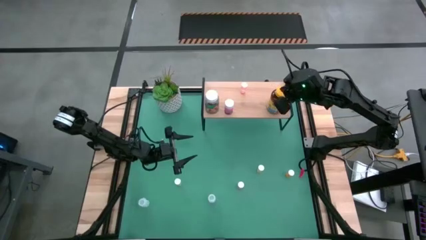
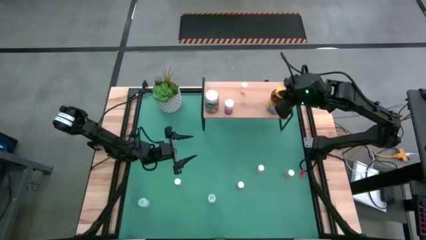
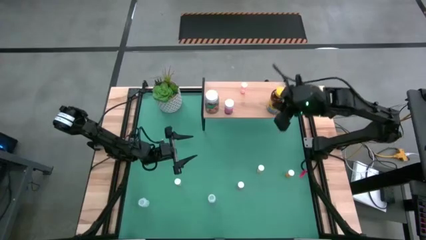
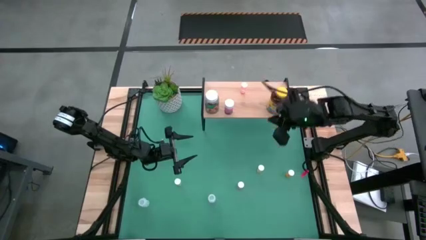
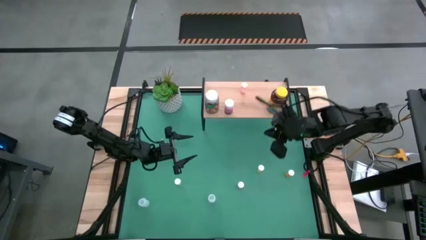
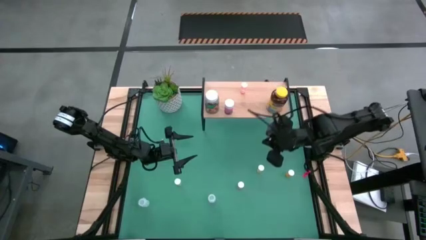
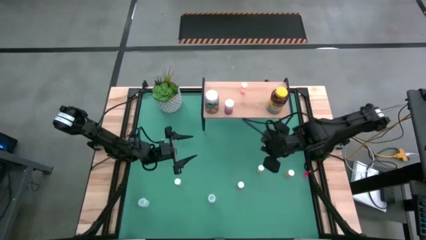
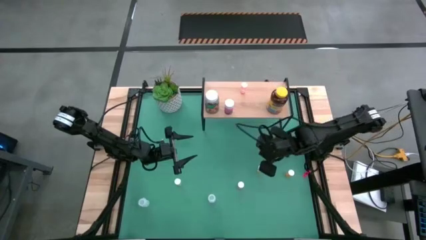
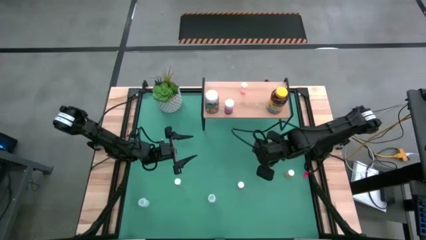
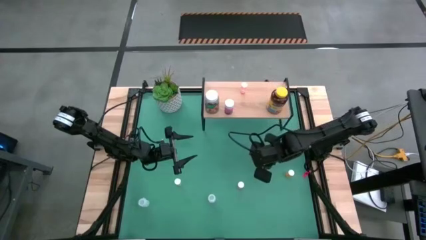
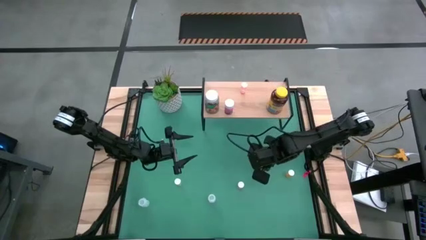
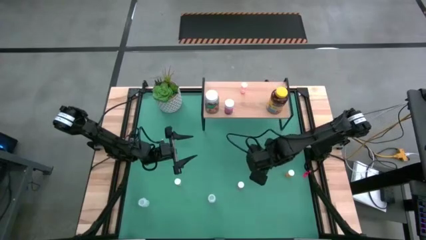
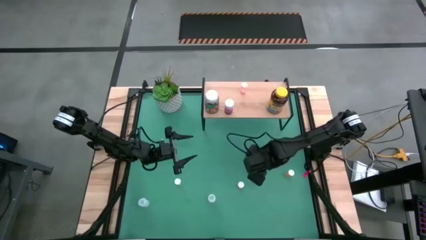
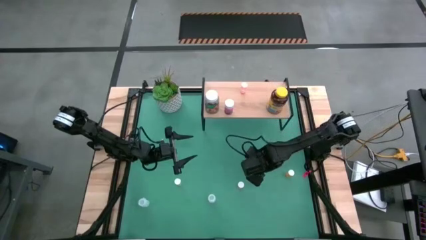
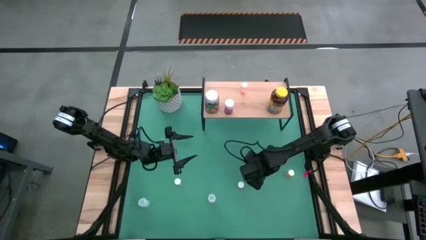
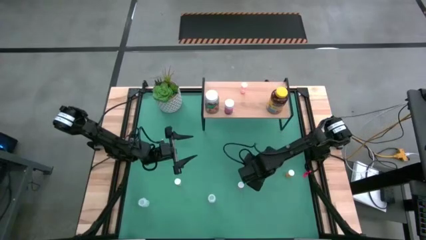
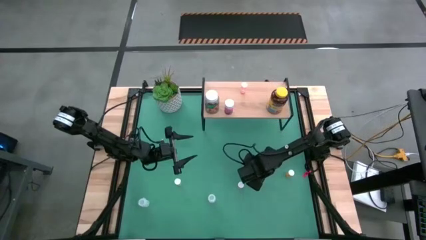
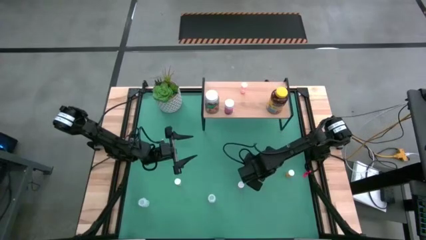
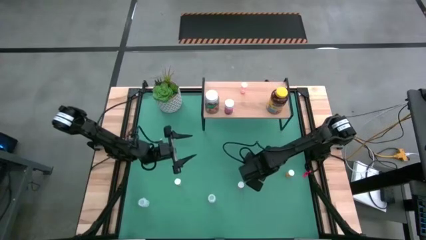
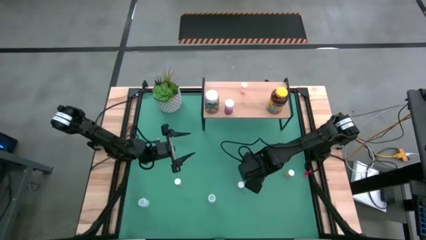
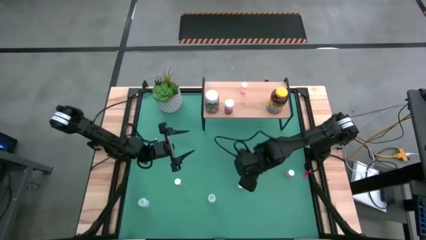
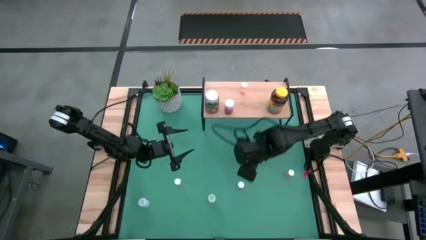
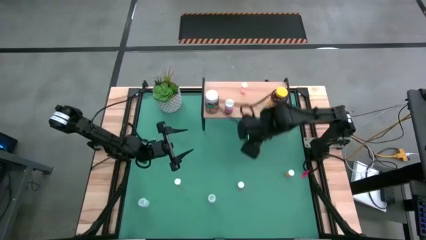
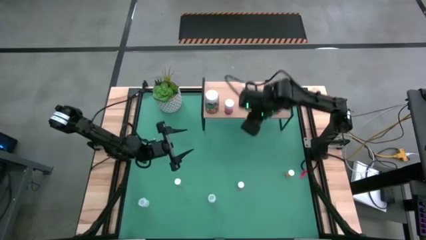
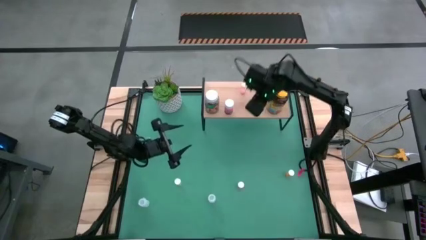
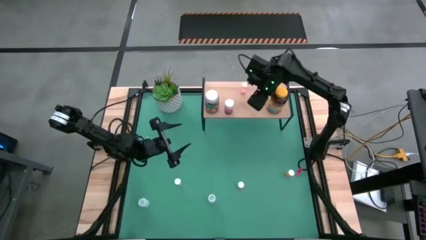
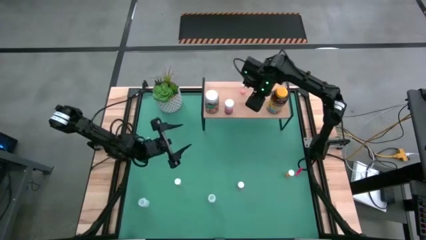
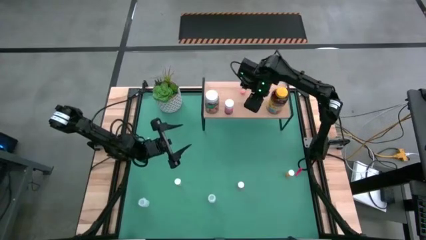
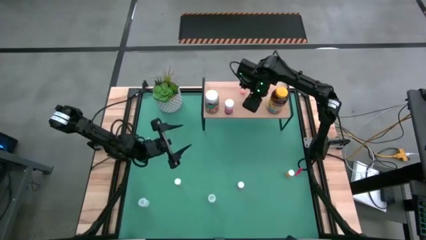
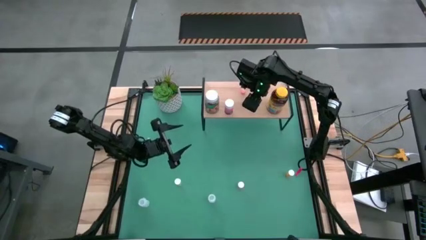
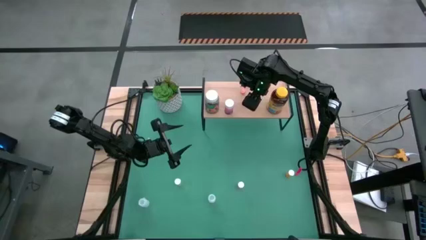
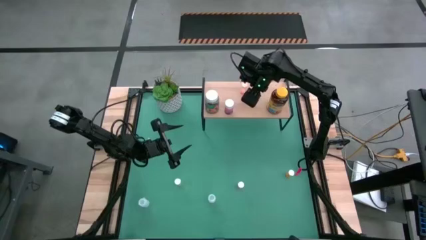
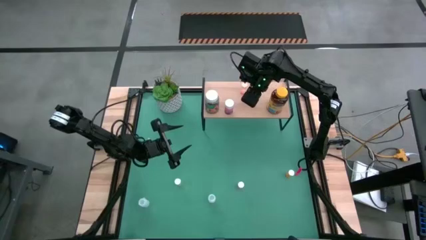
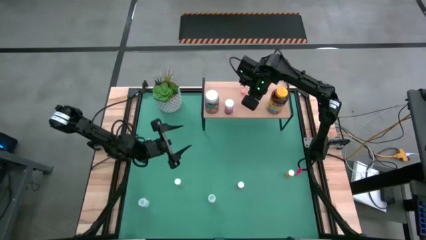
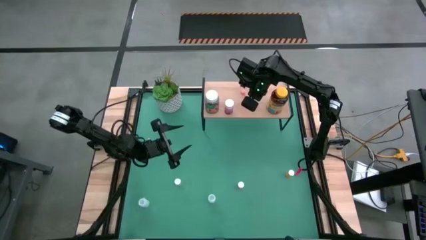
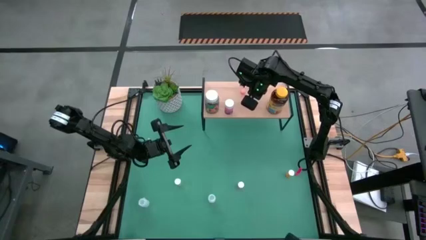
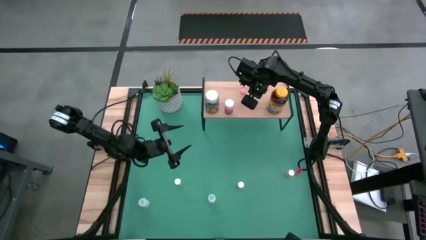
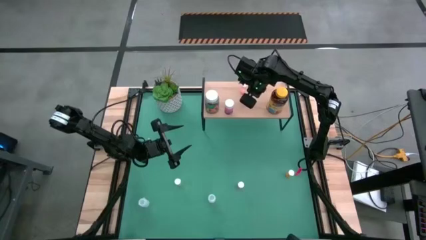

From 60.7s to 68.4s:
Task: Pick and place medicine bottles onto shelf by color
Put the small yellow medicine bottle on the shelf

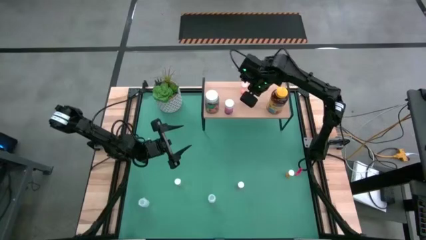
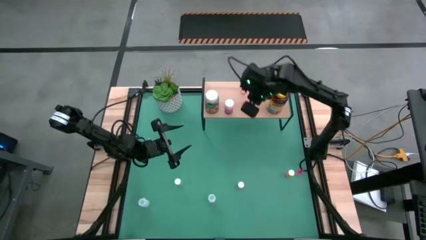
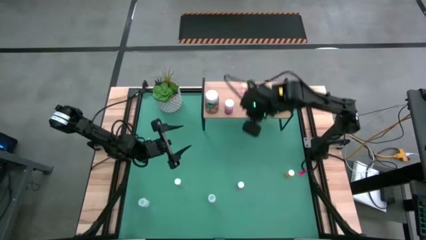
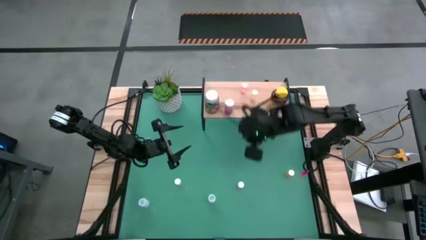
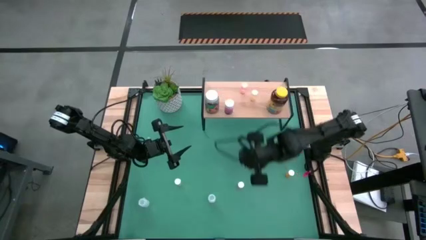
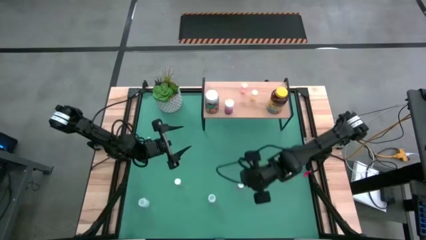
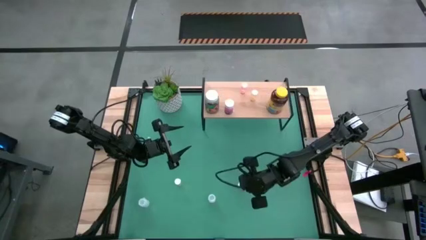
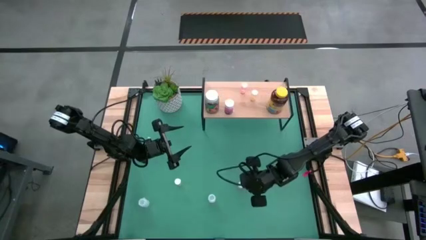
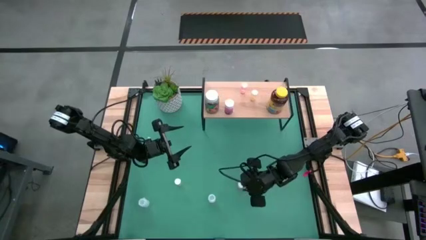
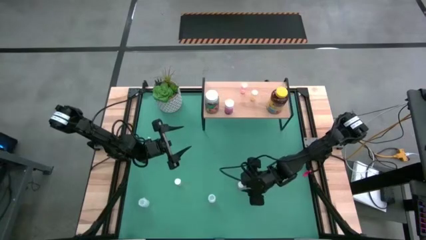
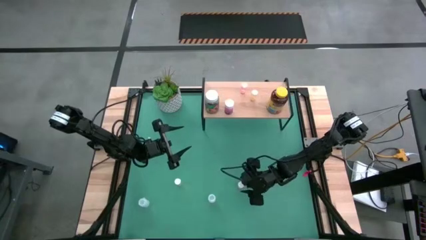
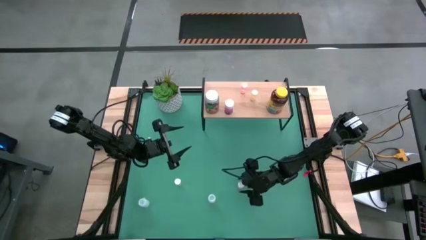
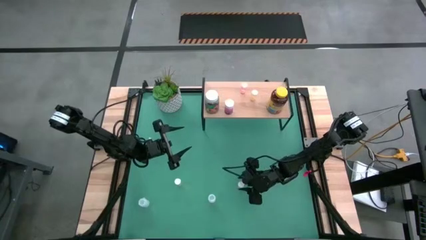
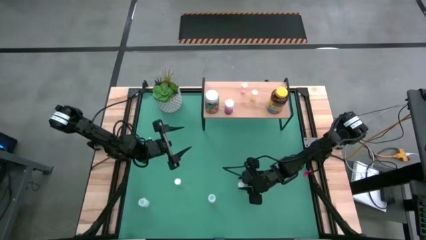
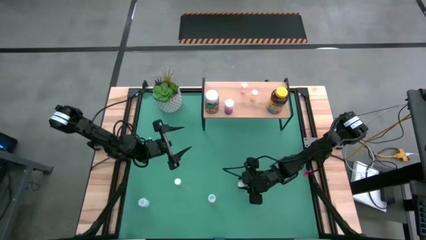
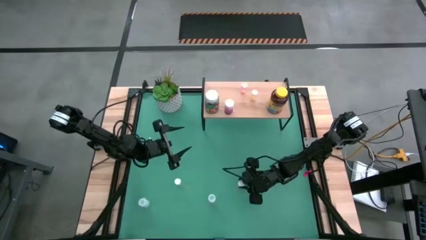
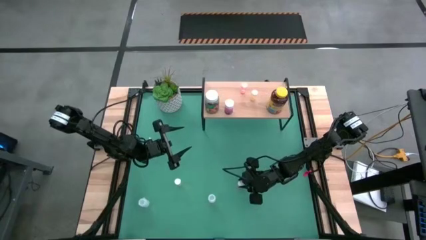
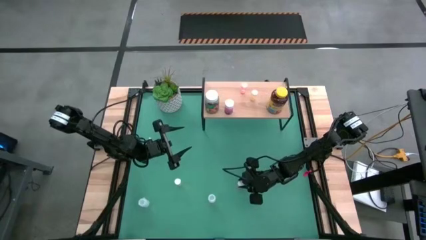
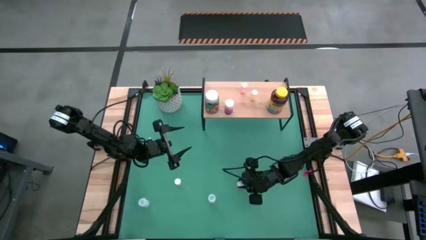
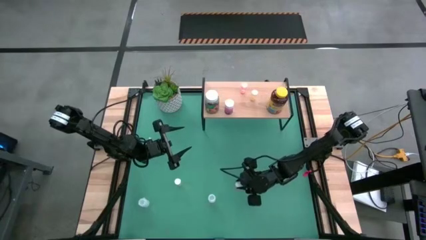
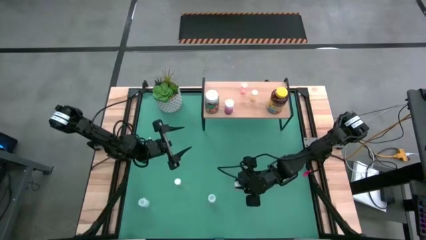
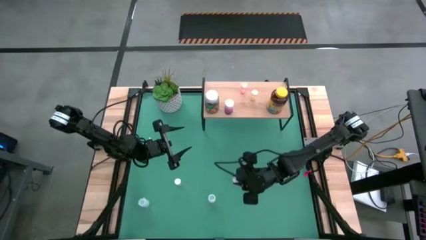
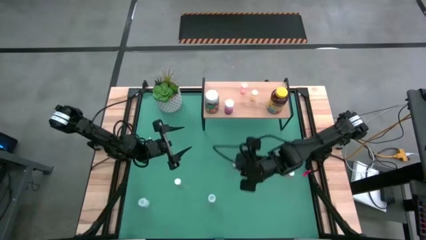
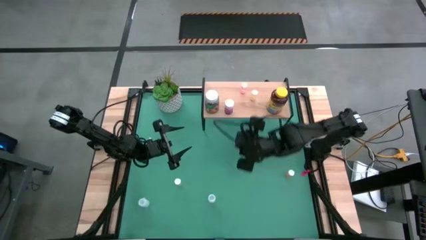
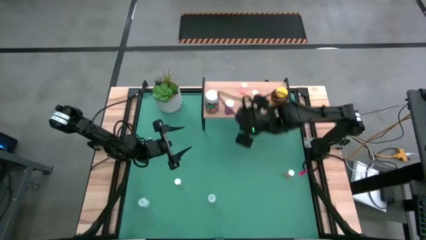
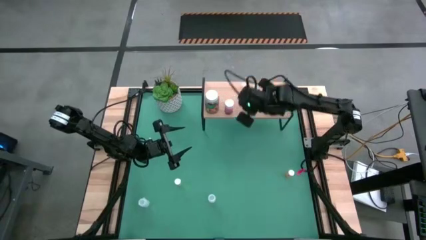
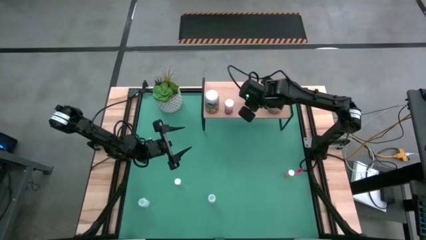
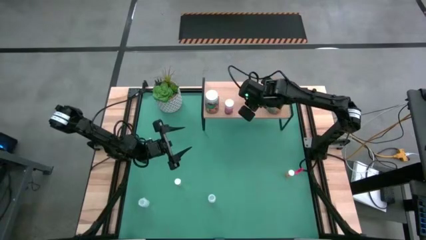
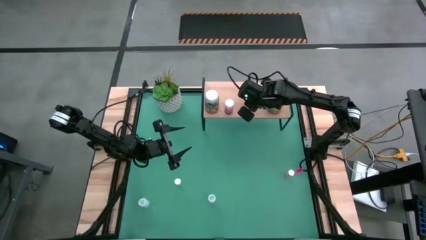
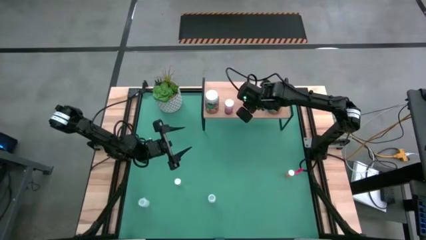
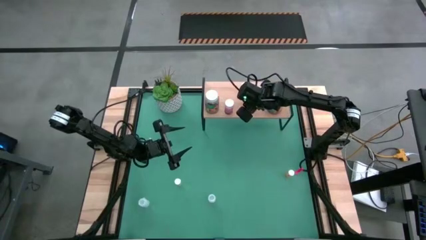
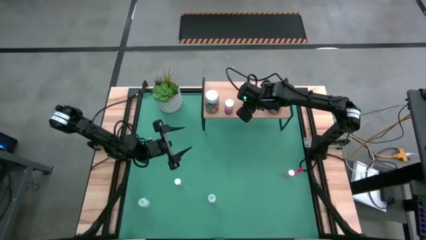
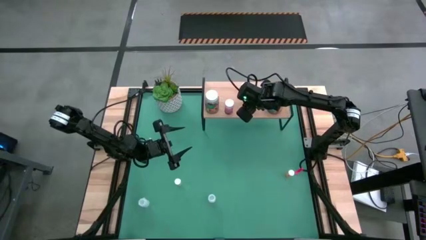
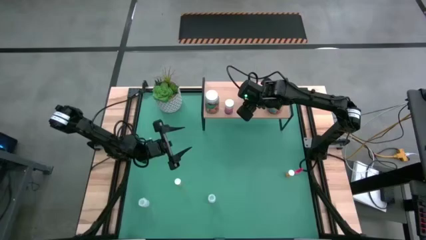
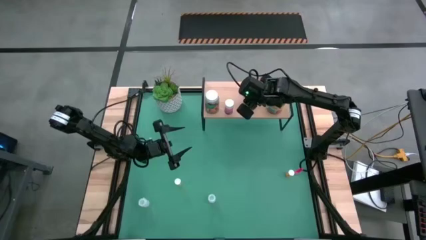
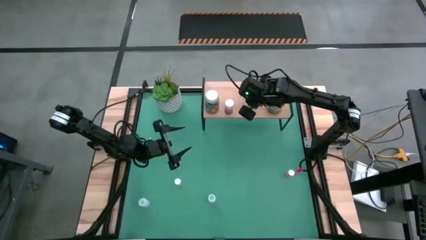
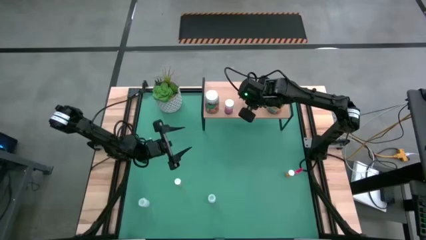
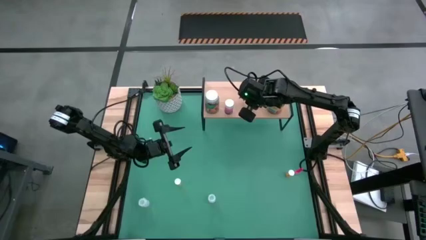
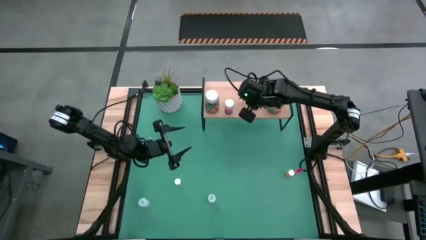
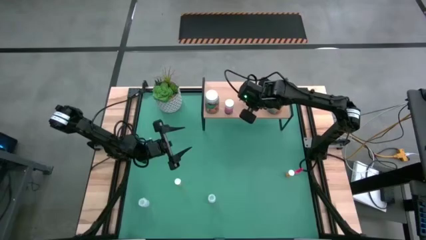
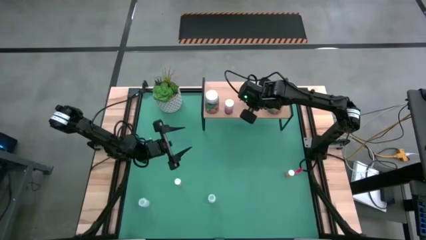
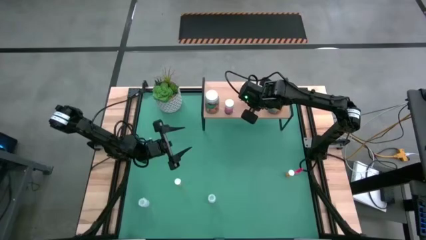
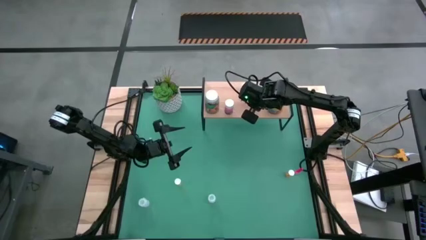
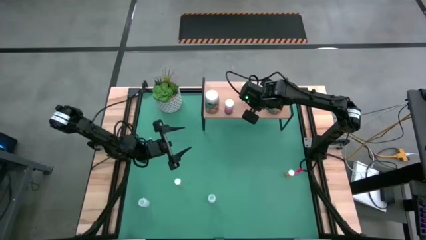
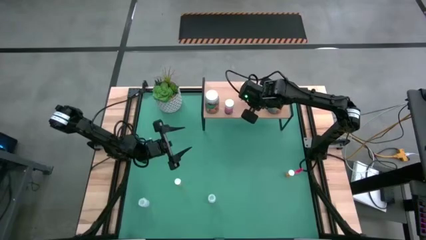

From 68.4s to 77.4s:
Put the small pink medicine bottle on the shelf
